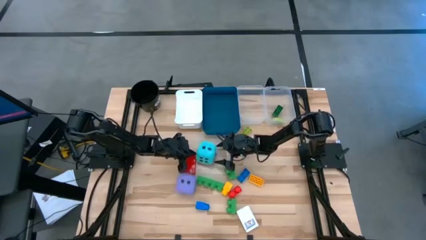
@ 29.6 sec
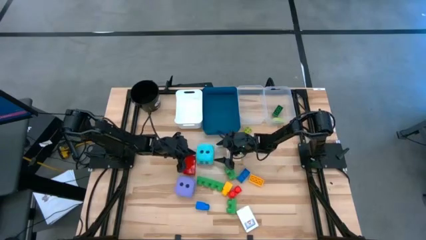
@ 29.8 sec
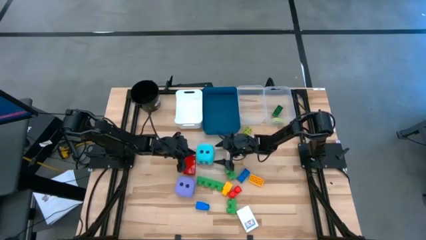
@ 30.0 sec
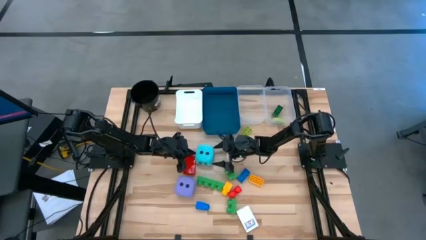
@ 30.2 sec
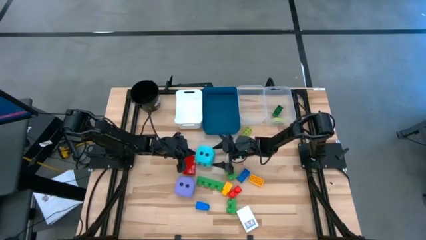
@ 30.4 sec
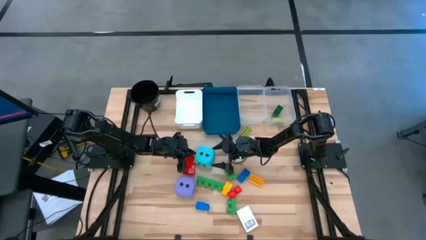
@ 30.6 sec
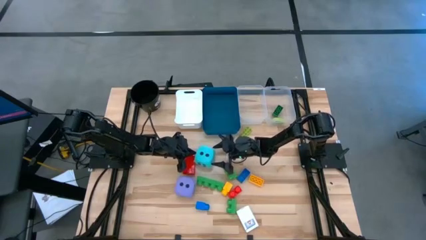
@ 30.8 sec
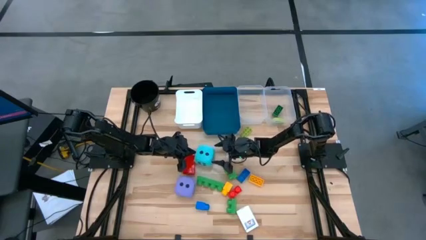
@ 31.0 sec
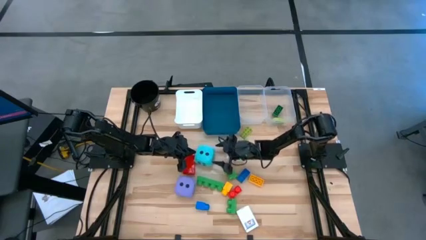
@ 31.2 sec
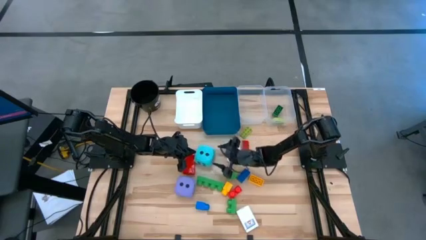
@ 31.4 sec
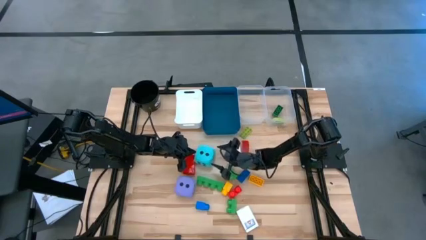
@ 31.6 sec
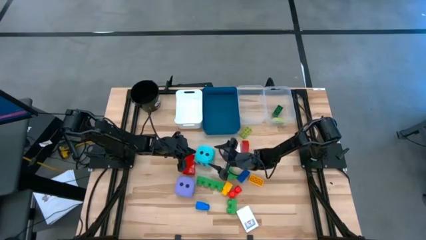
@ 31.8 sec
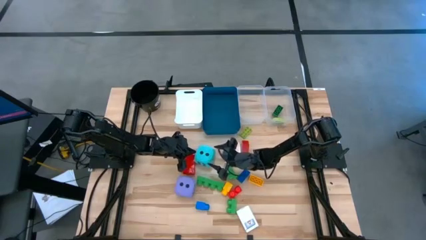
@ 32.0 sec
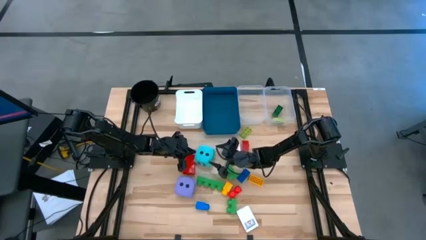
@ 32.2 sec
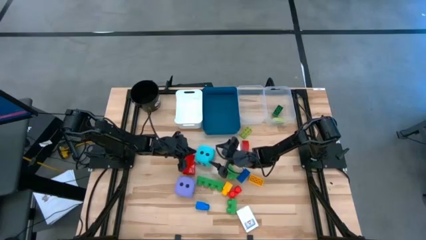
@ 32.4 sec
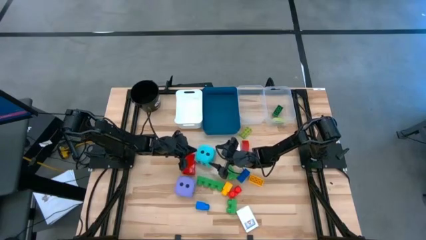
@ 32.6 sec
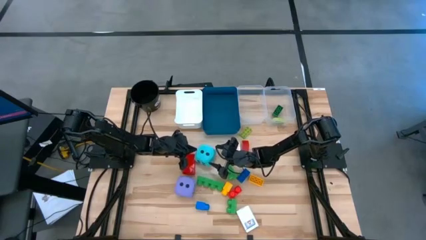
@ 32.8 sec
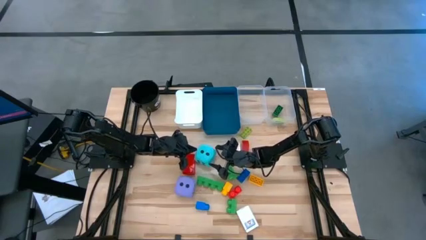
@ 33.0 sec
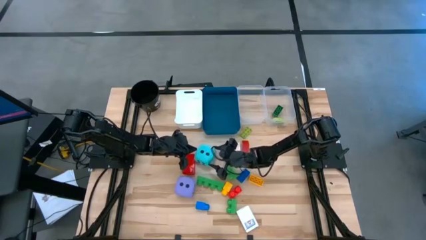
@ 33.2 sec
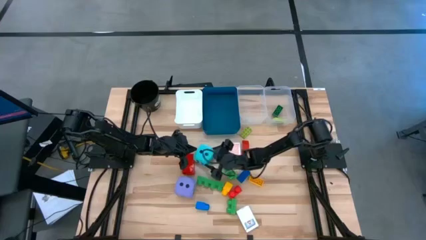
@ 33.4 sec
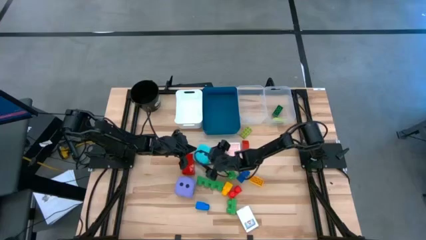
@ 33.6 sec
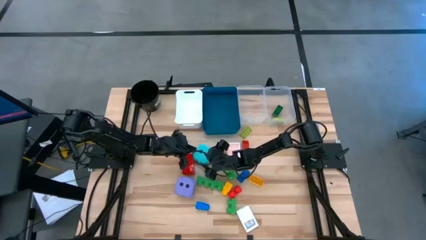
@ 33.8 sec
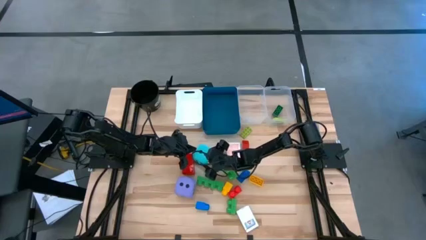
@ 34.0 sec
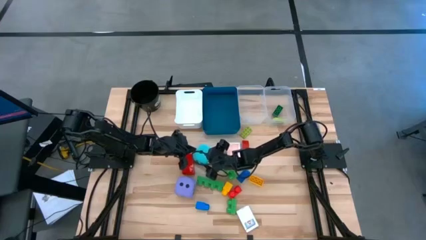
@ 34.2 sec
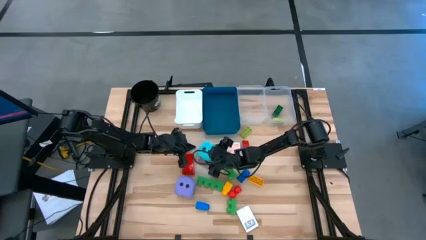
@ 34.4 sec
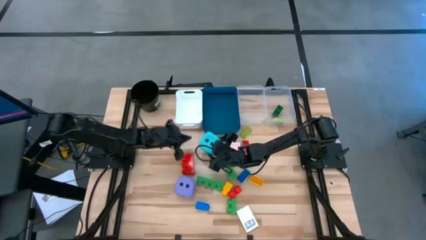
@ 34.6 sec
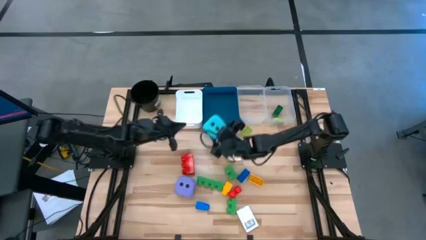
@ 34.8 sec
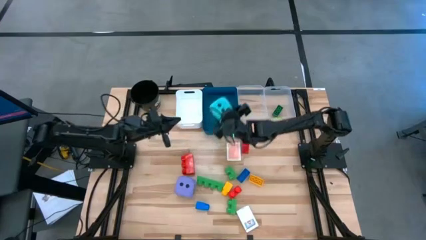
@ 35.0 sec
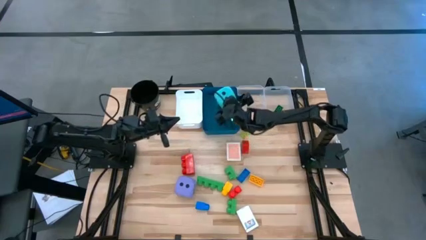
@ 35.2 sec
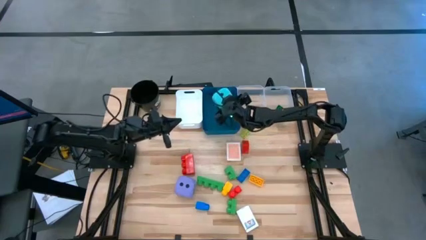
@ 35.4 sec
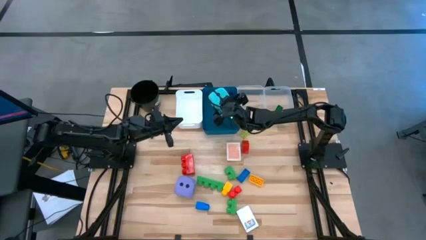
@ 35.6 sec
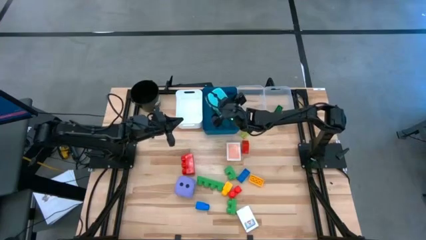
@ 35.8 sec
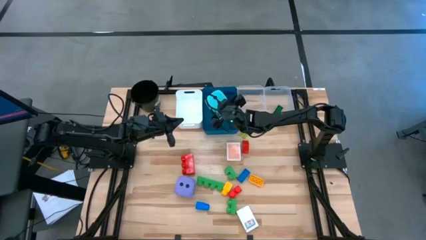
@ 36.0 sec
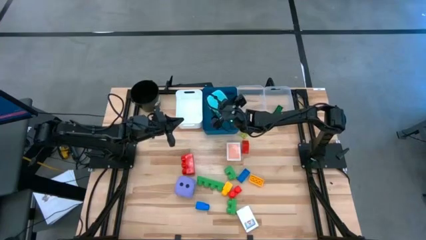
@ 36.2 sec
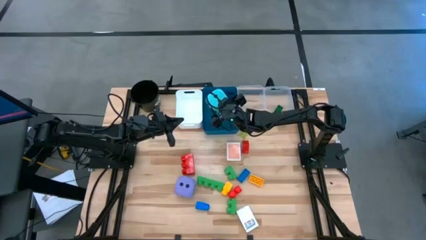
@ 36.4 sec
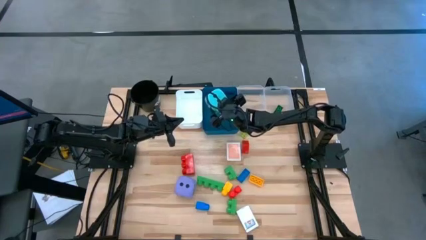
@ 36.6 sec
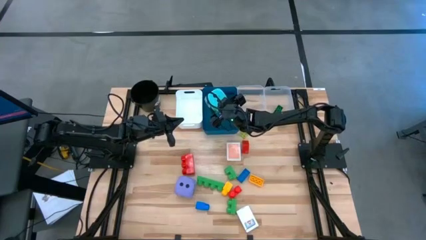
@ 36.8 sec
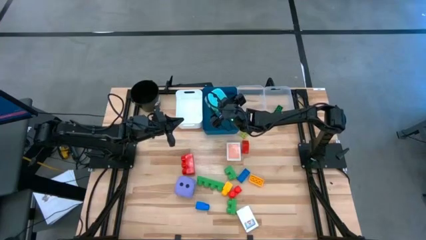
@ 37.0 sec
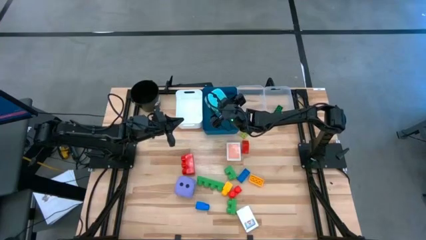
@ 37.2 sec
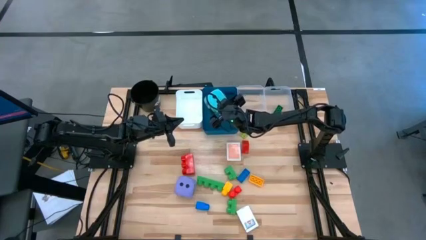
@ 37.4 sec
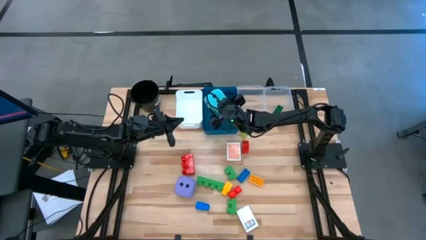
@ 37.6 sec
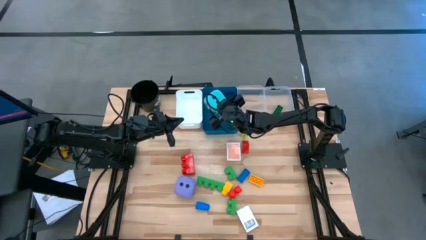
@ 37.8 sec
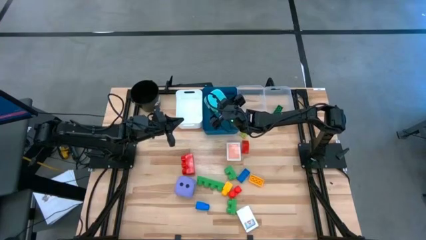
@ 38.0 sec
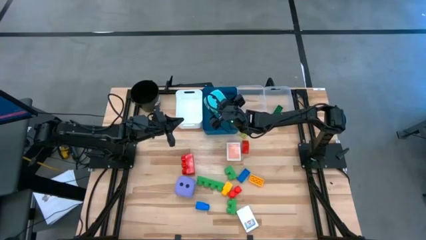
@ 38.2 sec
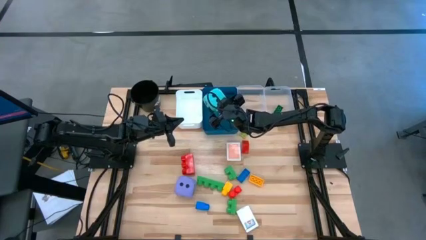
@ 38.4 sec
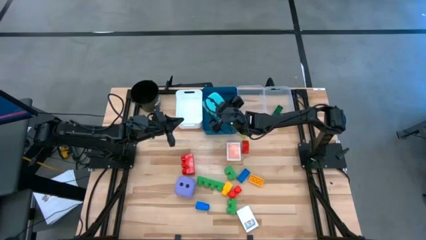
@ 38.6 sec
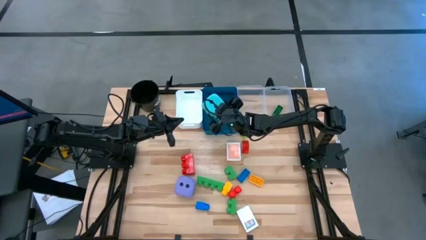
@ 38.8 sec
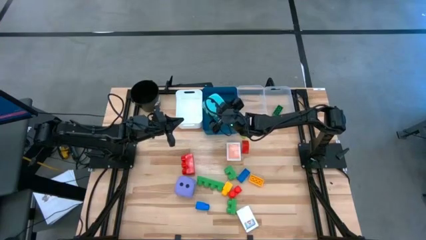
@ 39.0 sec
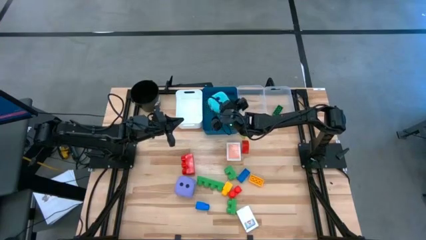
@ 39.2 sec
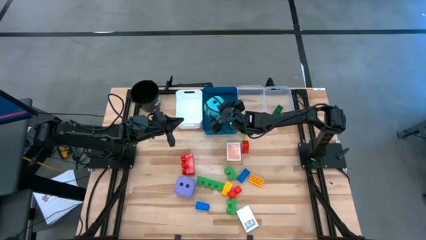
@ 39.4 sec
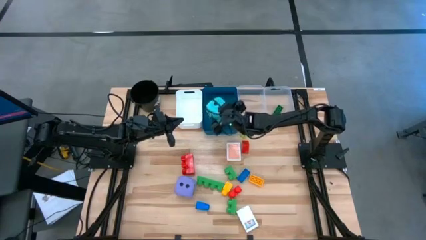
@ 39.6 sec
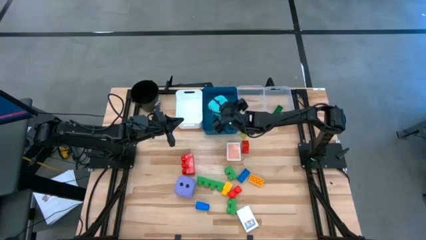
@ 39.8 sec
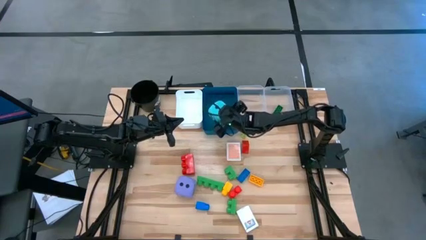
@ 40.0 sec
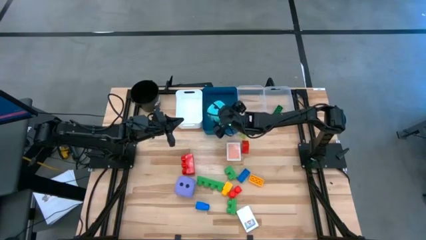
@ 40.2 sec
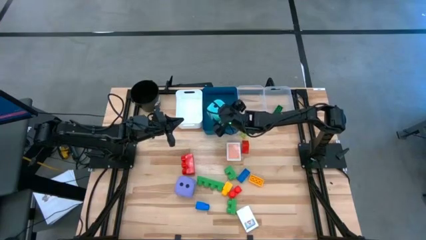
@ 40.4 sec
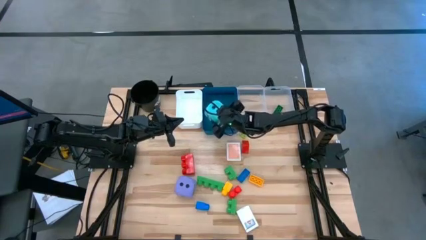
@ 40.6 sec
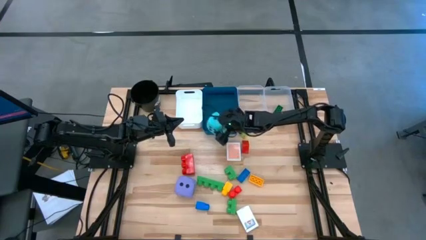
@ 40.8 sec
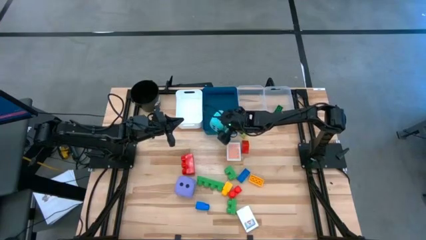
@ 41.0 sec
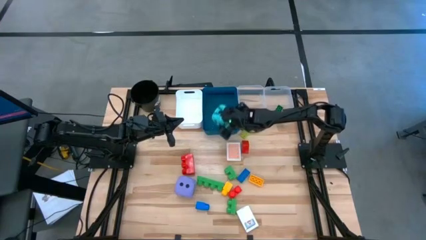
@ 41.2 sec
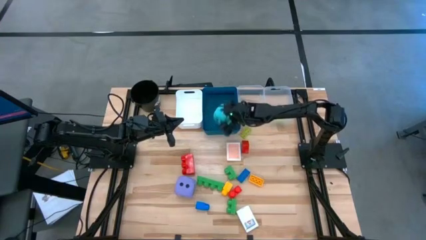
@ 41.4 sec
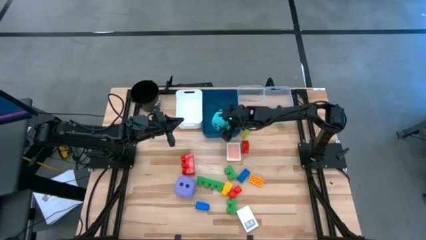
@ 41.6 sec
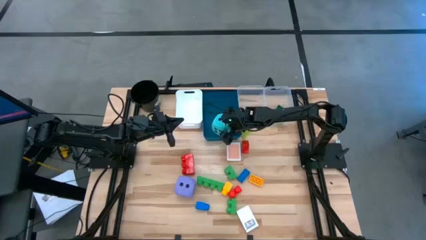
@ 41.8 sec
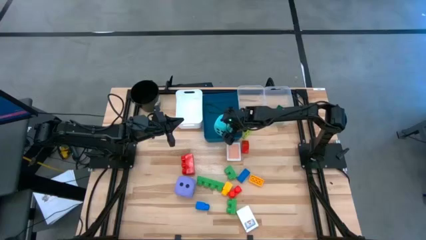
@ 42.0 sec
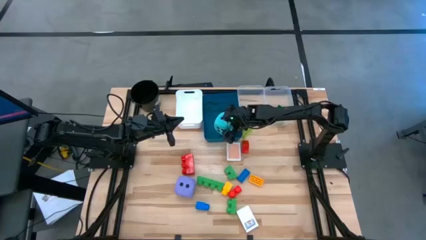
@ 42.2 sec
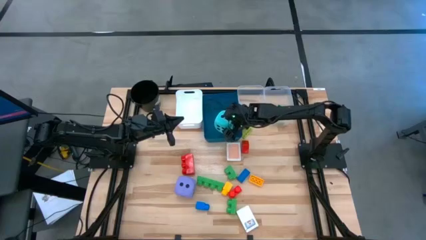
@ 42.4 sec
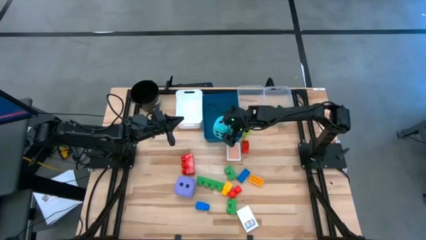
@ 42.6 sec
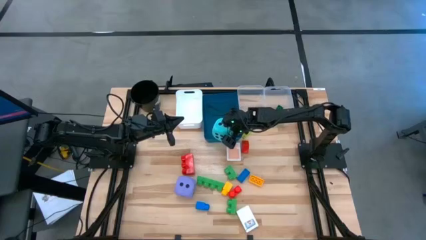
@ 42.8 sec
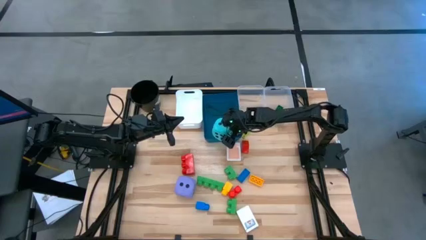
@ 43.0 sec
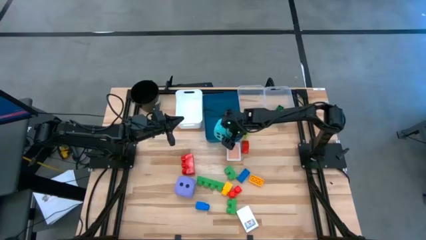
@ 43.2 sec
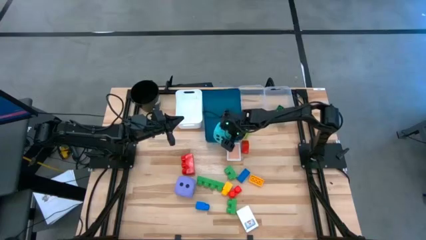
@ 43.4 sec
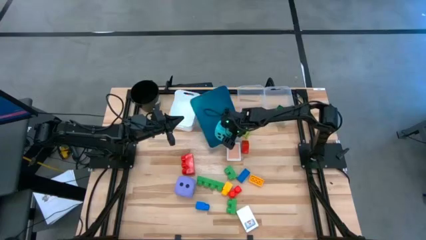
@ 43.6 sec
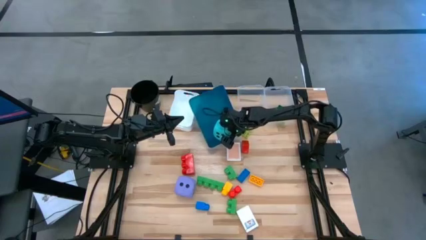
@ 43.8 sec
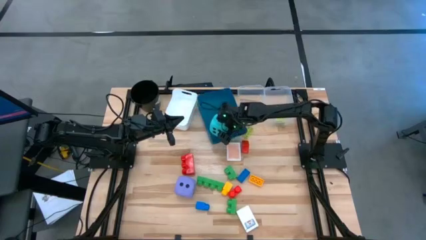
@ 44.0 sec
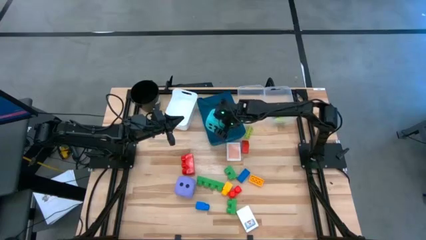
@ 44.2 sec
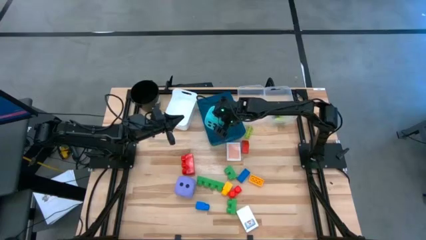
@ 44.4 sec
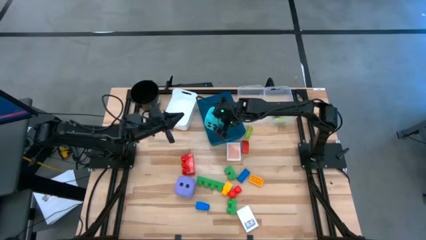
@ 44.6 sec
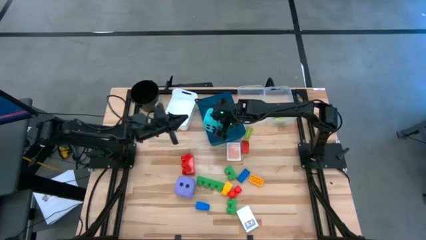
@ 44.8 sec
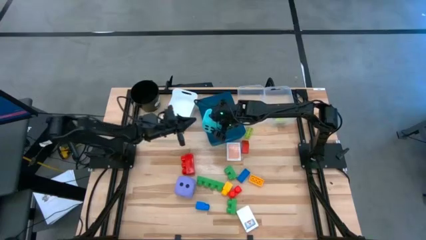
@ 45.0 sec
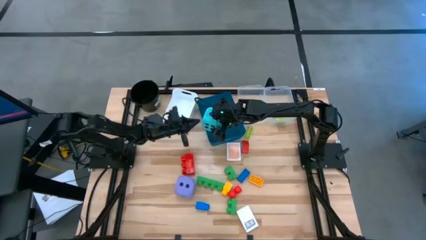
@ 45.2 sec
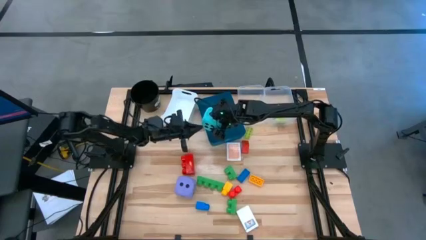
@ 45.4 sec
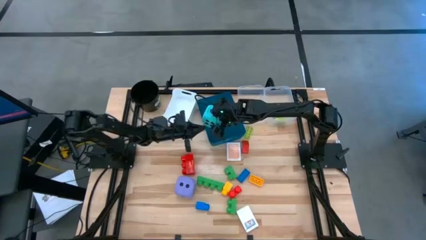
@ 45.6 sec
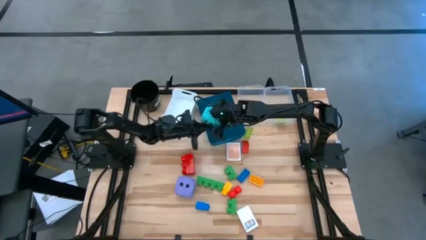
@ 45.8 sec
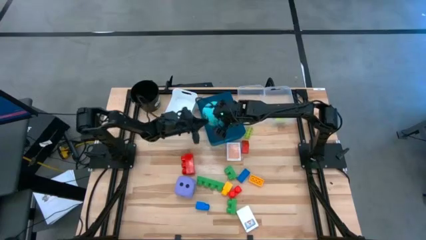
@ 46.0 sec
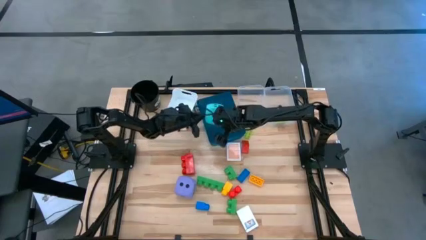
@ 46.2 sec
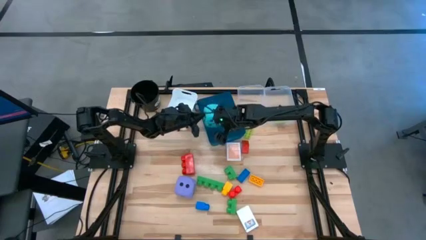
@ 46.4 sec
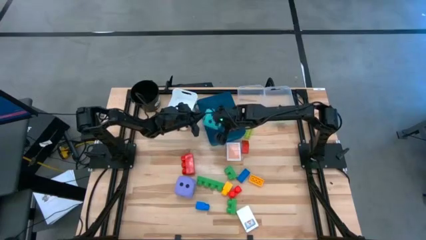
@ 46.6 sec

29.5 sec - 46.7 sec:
Task: Pick & Place Toys
Put the large blue dice into the blue bin
